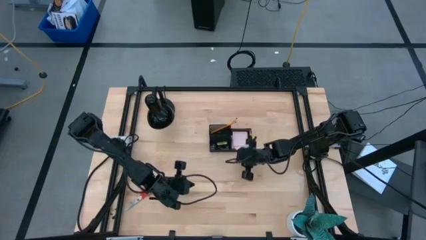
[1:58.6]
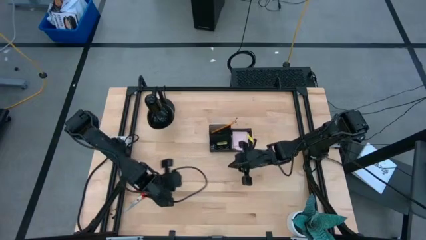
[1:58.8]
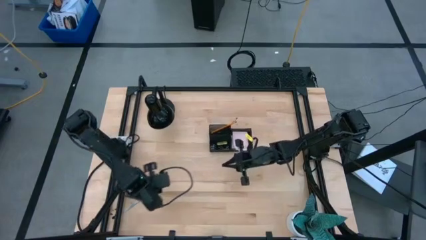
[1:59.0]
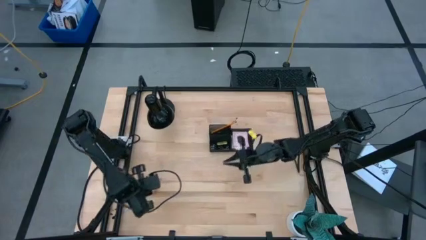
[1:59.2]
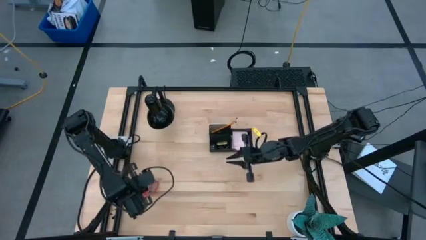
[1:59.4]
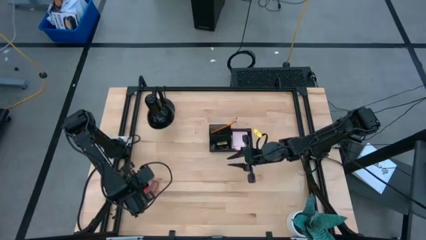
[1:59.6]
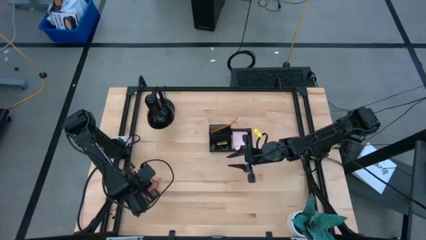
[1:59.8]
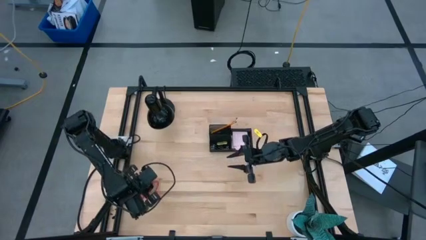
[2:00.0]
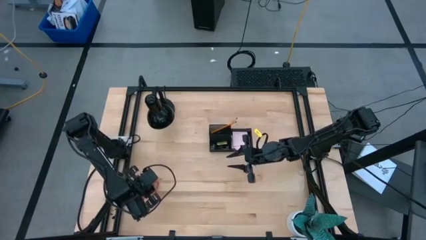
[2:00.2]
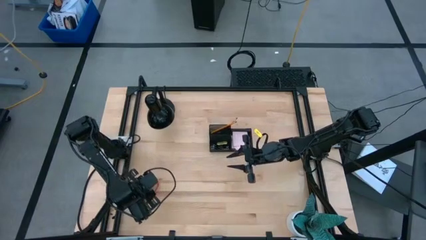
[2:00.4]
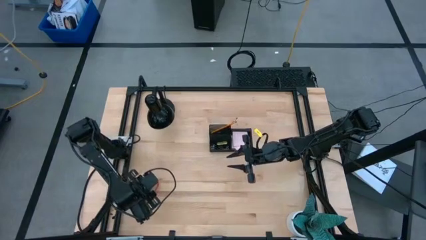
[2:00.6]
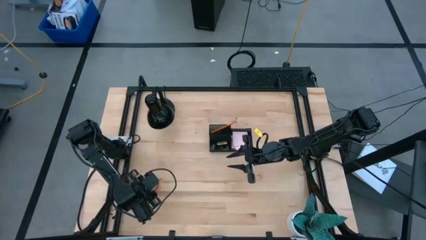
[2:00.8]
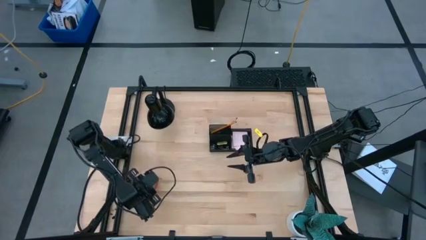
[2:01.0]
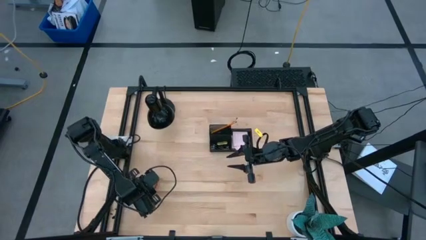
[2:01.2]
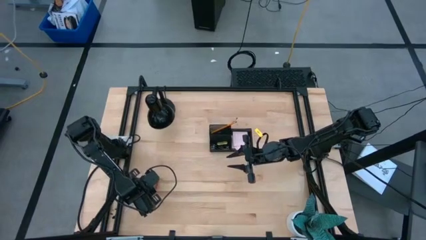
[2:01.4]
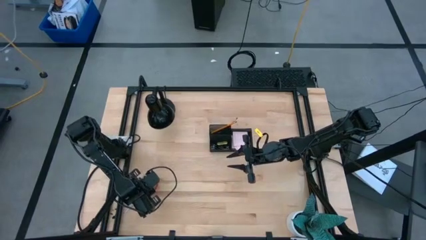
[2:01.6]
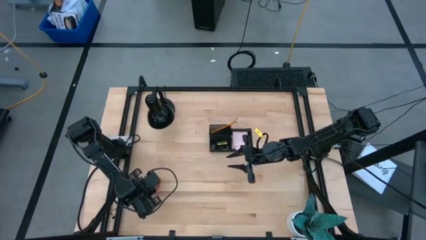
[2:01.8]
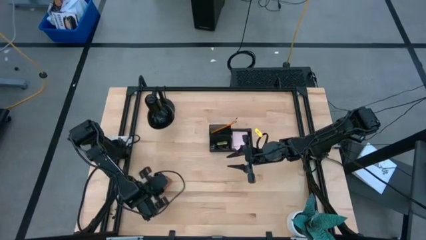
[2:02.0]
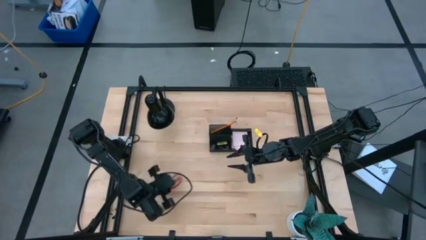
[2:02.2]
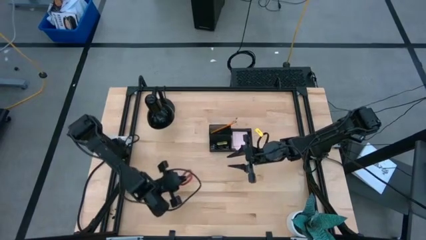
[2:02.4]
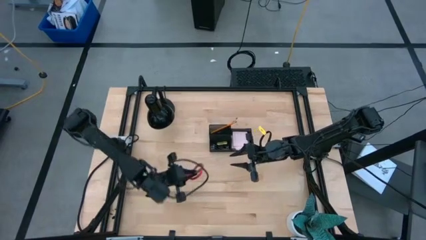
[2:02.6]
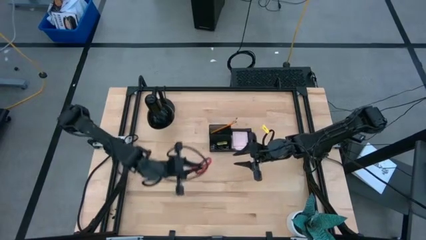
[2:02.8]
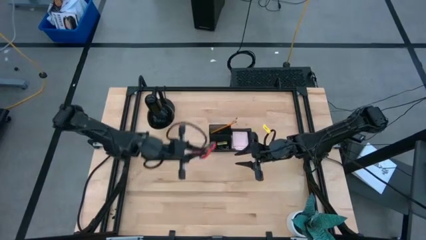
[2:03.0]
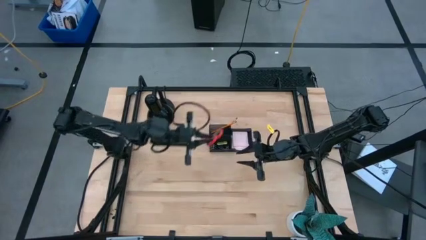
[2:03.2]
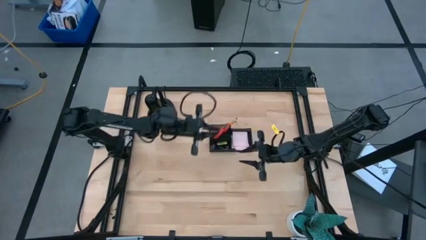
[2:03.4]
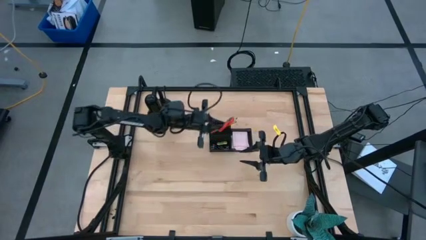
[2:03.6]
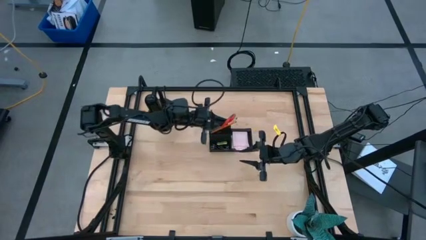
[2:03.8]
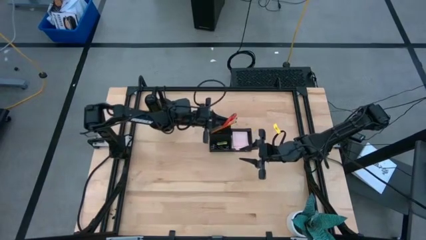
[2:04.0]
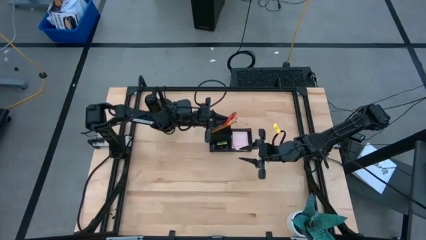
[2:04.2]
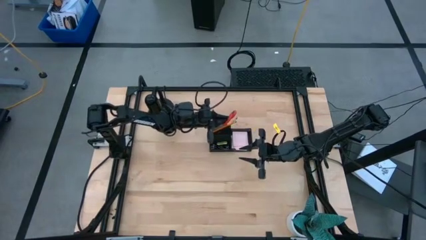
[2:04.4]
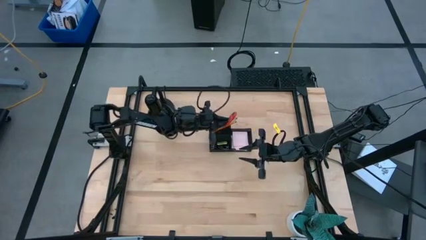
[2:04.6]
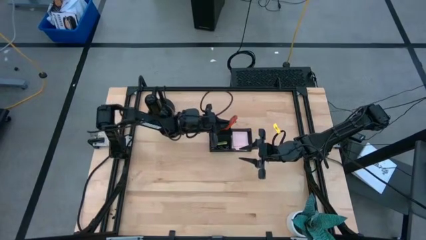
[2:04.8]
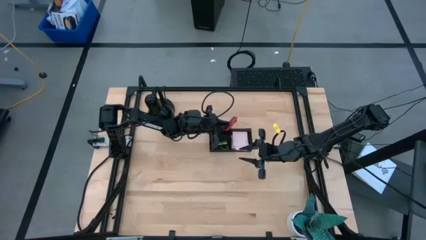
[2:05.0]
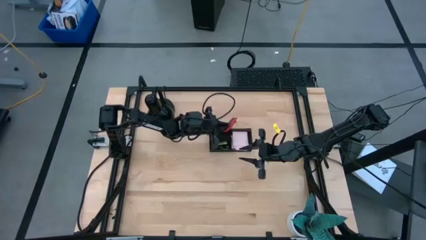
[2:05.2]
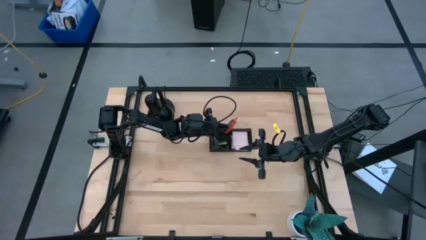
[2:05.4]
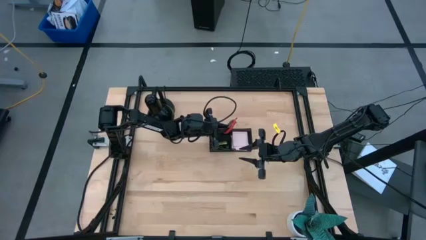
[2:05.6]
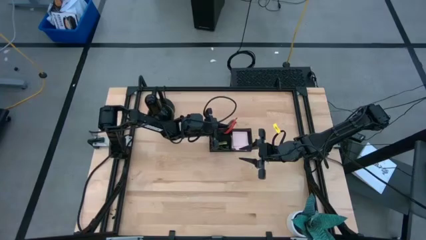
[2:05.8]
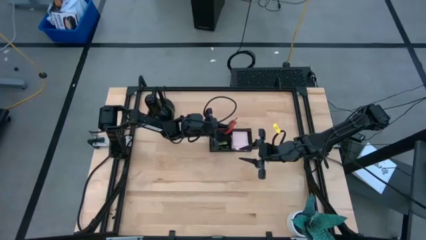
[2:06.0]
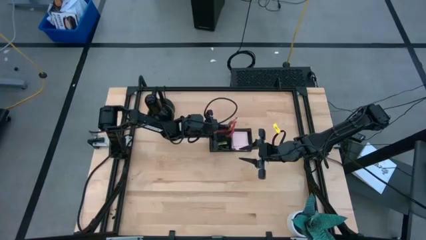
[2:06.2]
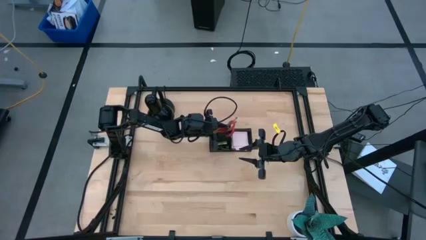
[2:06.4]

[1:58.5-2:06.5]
Task: Pick and place office supplies into organizer
Put the orange scissors into the black desk organizer

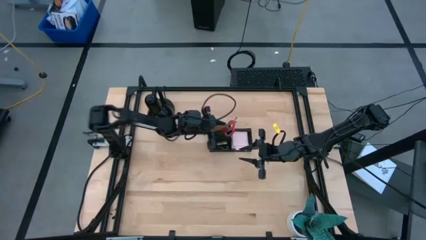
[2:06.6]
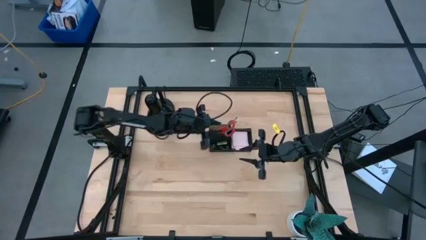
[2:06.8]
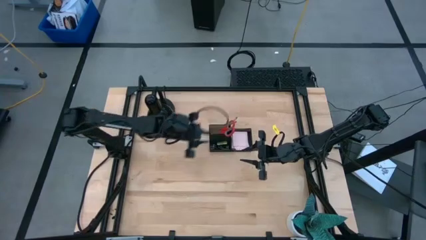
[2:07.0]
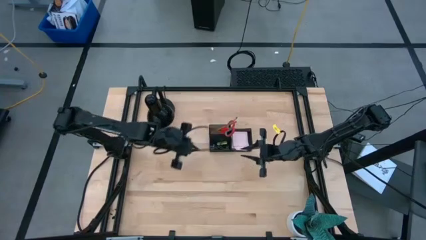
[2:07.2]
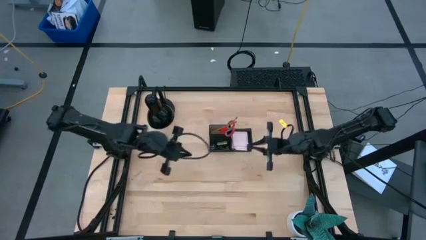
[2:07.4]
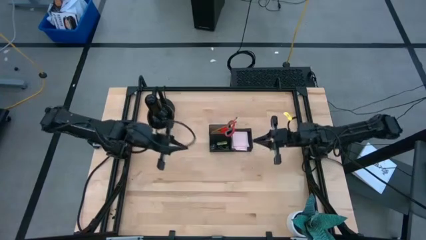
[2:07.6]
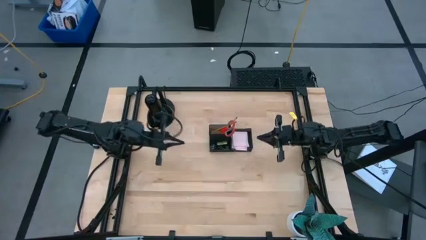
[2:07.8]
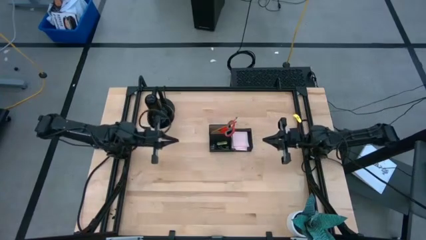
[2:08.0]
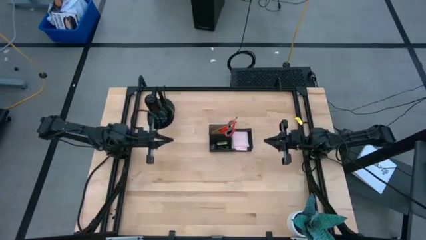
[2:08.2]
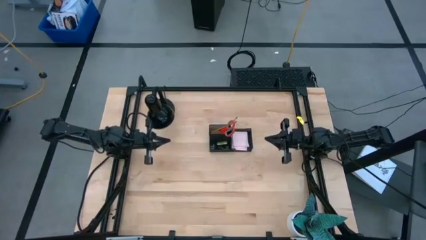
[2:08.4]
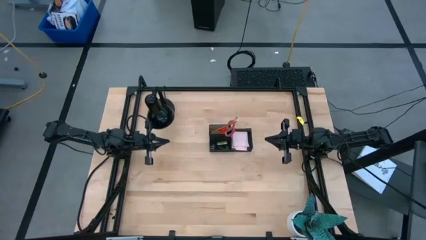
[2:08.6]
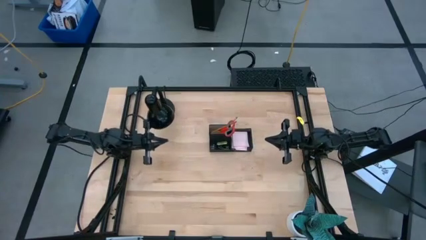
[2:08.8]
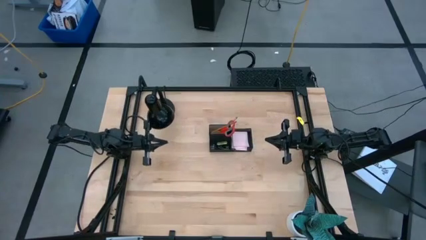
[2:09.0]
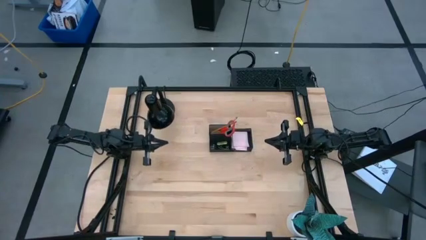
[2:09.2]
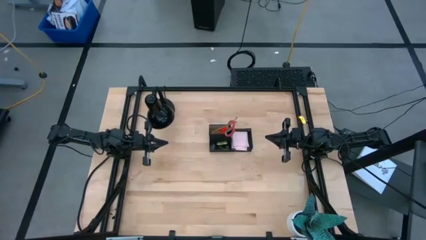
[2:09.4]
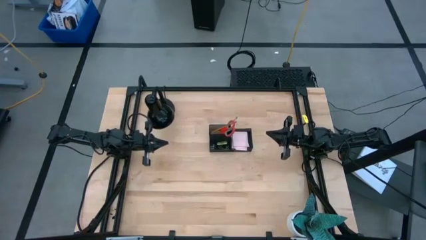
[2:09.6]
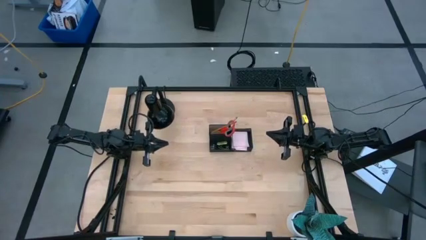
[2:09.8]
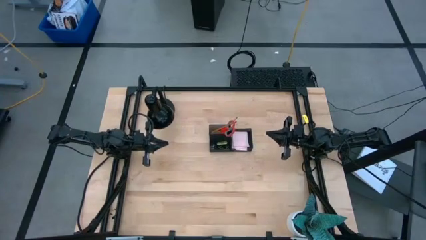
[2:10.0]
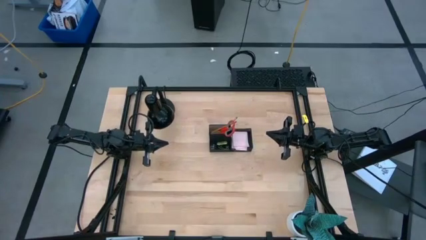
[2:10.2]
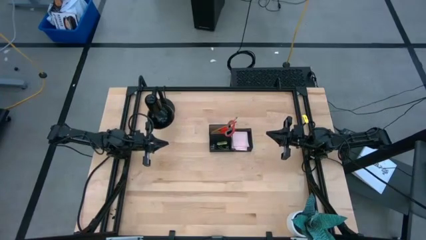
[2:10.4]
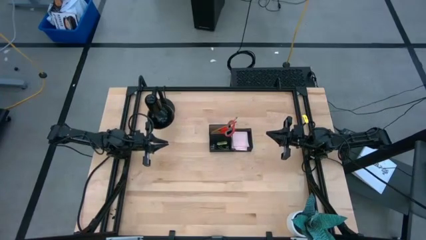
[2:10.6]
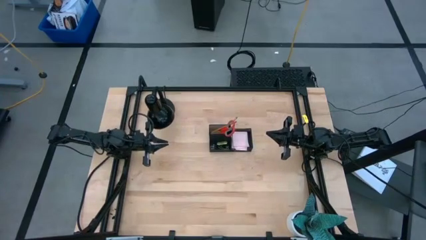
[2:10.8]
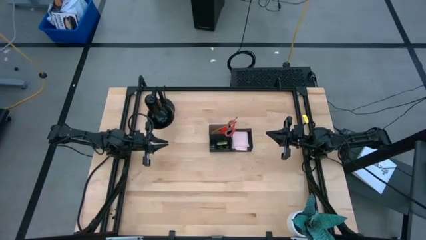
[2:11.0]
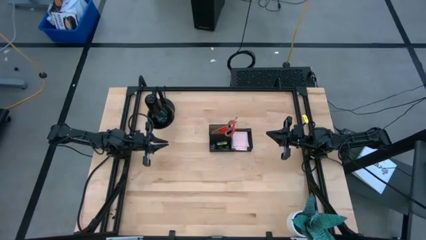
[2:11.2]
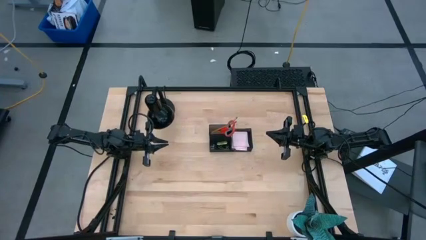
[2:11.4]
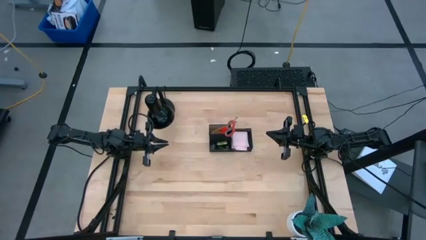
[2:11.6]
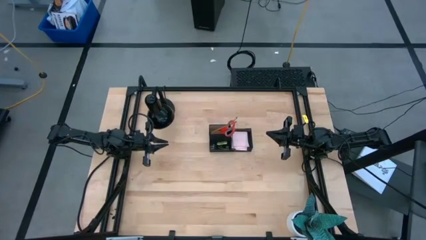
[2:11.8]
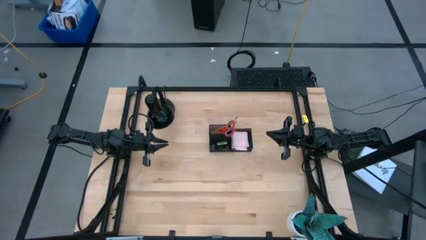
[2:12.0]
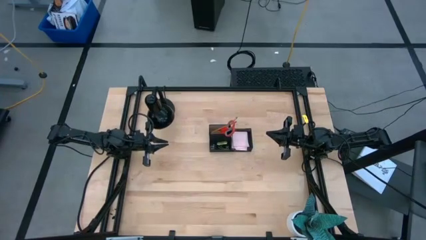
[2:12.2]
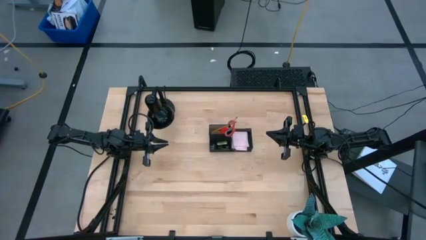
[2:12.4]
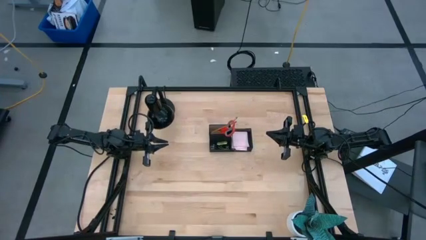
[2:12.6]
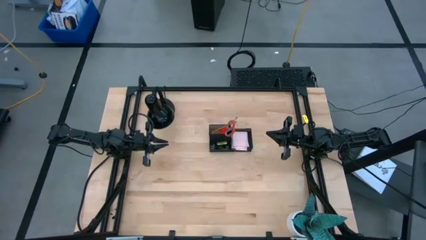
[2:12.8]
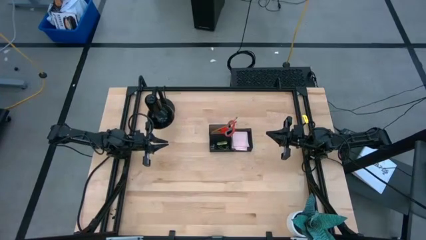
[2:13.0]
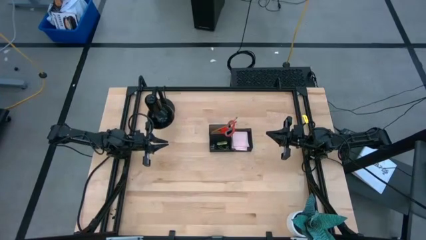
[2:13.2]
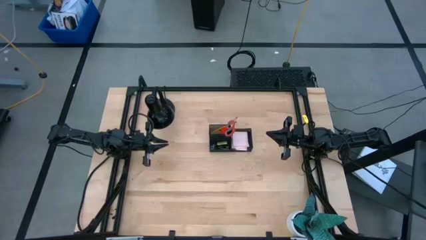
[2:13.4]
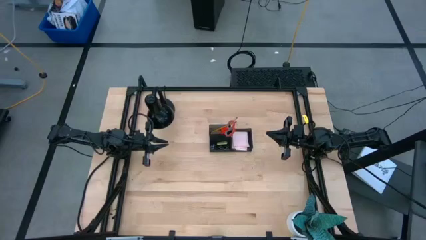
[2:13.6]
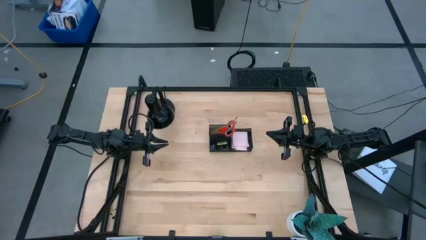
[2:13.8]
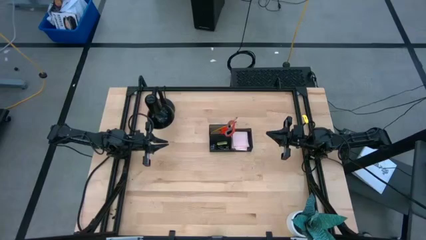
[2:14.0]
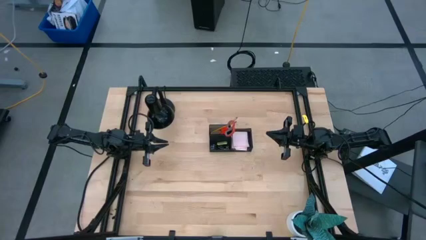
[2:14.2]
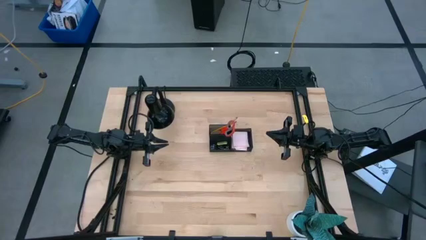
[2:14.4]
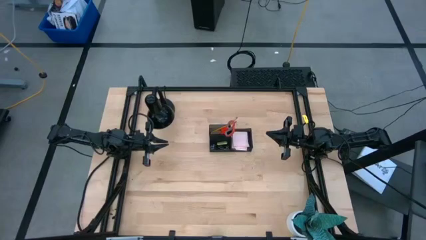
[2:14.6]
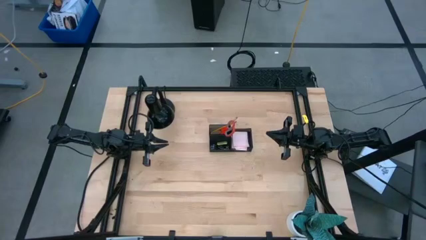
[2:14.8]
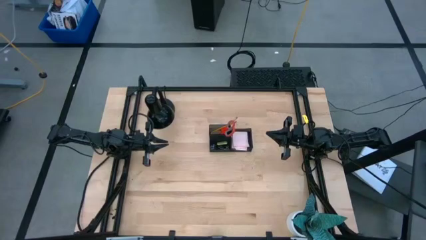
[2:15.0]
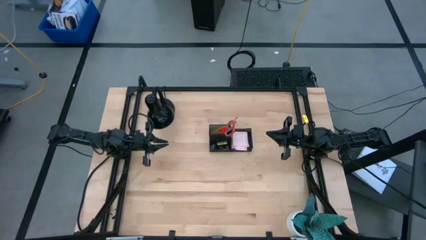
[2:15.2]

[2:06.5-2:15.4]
Return to Home Position
